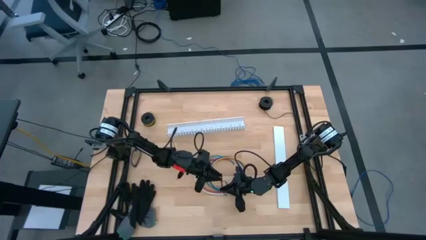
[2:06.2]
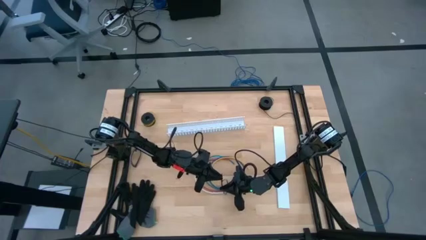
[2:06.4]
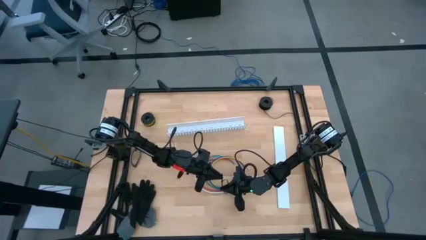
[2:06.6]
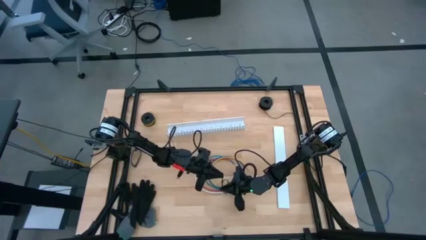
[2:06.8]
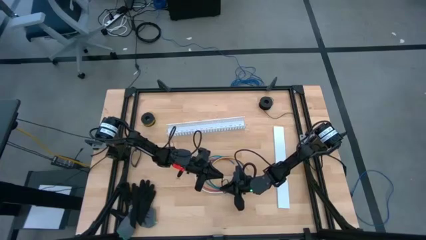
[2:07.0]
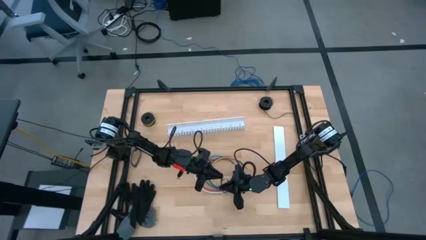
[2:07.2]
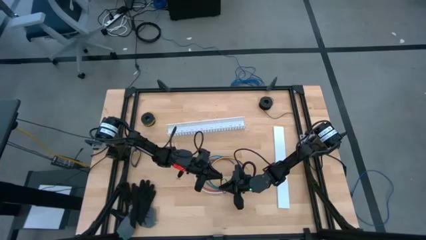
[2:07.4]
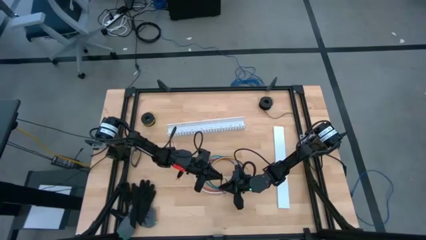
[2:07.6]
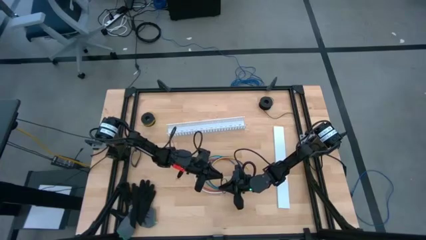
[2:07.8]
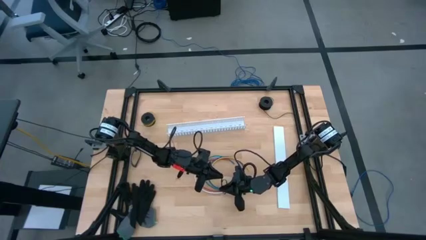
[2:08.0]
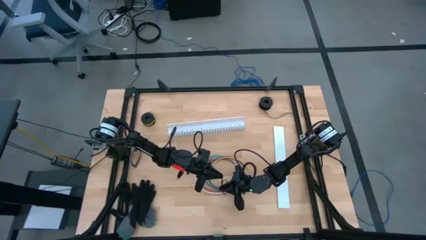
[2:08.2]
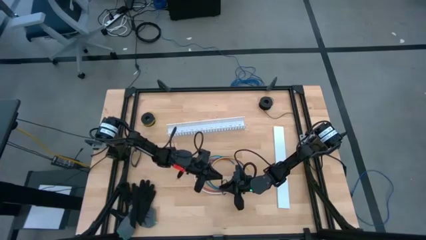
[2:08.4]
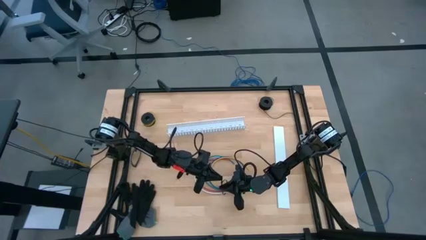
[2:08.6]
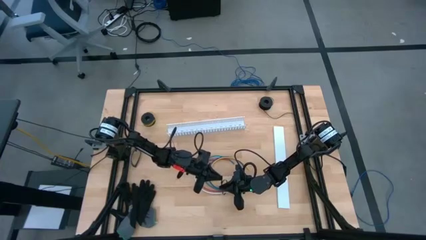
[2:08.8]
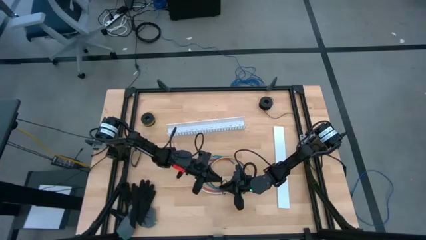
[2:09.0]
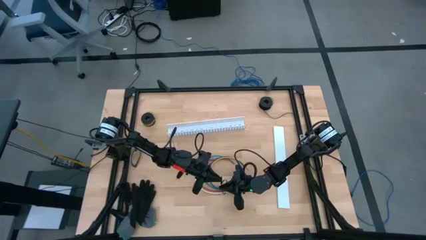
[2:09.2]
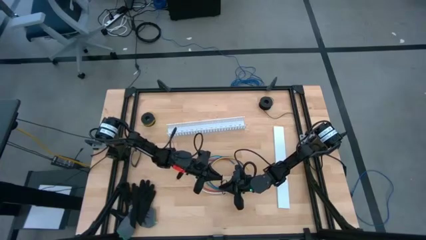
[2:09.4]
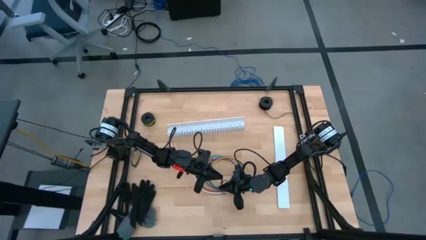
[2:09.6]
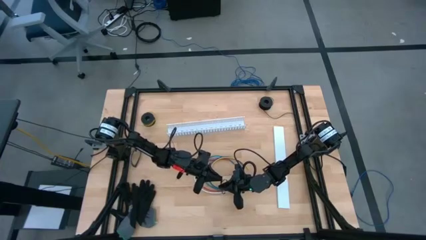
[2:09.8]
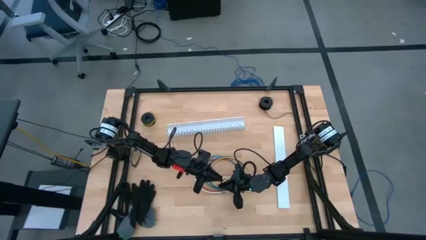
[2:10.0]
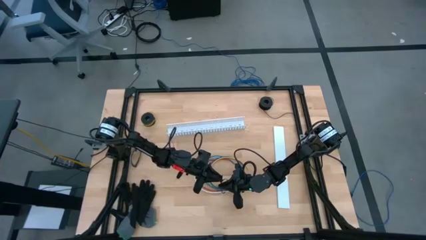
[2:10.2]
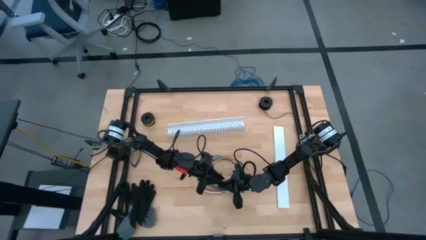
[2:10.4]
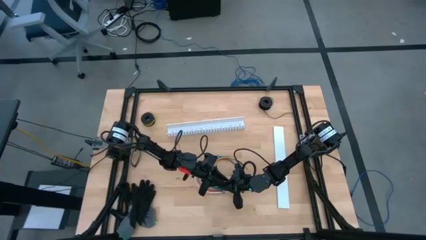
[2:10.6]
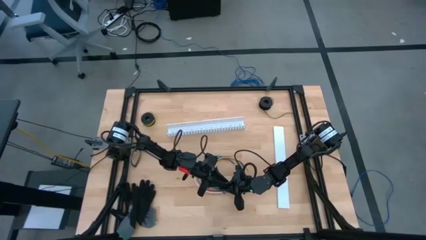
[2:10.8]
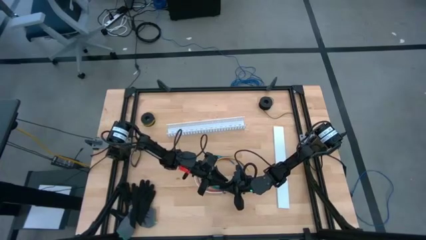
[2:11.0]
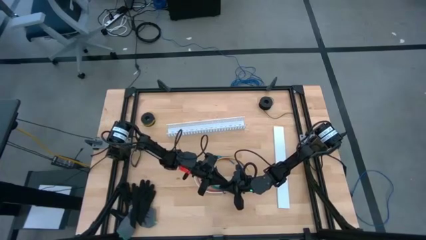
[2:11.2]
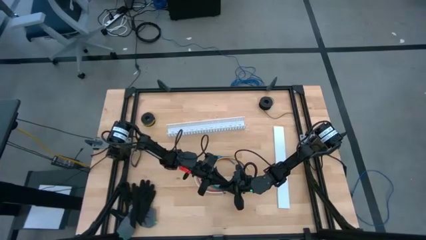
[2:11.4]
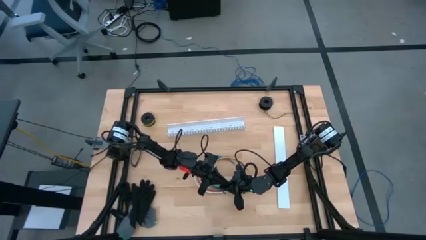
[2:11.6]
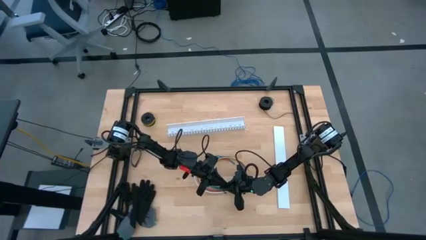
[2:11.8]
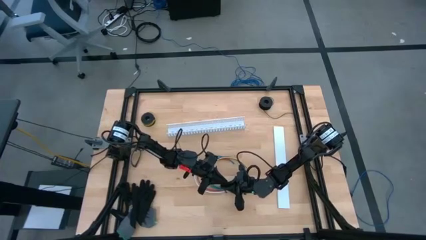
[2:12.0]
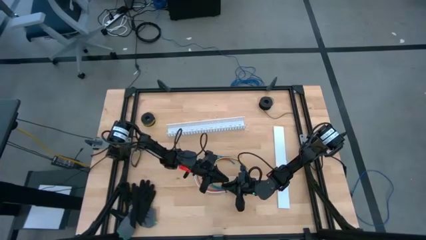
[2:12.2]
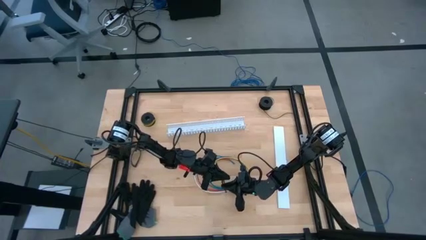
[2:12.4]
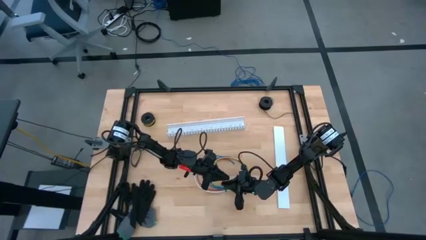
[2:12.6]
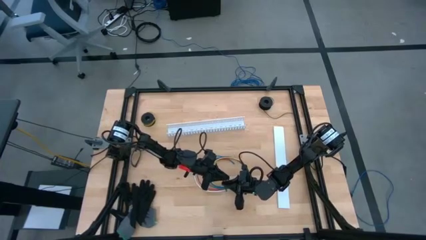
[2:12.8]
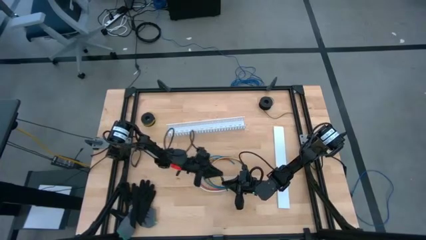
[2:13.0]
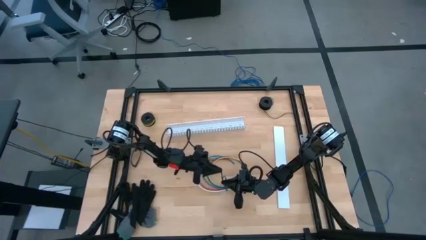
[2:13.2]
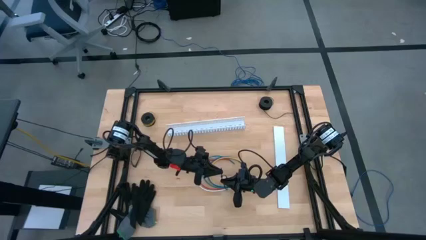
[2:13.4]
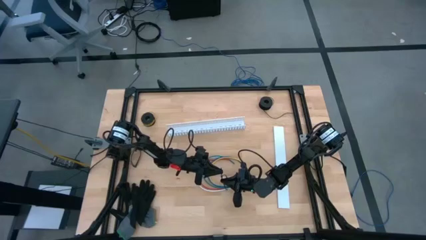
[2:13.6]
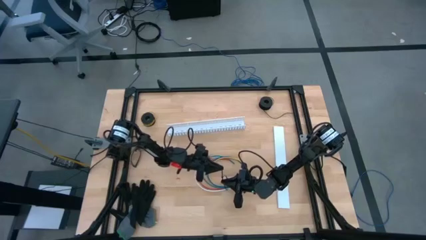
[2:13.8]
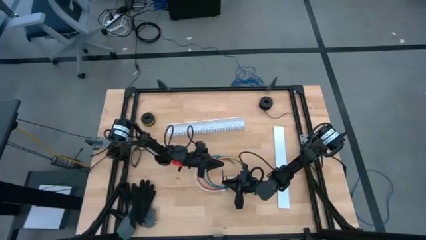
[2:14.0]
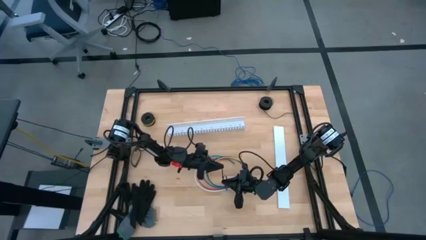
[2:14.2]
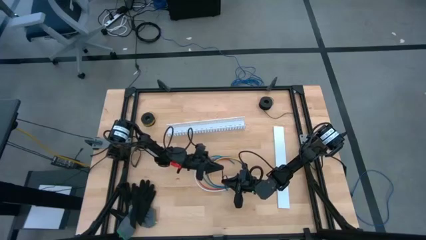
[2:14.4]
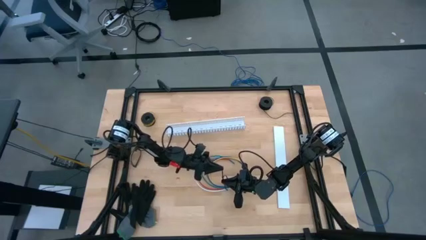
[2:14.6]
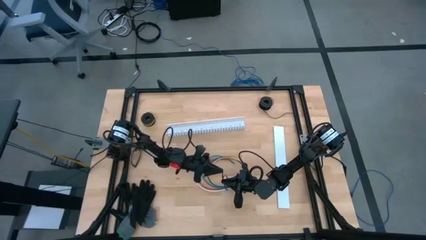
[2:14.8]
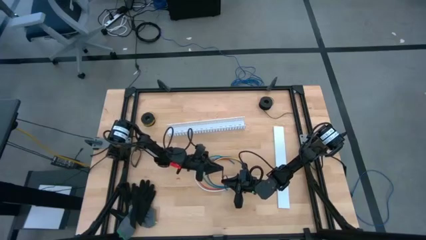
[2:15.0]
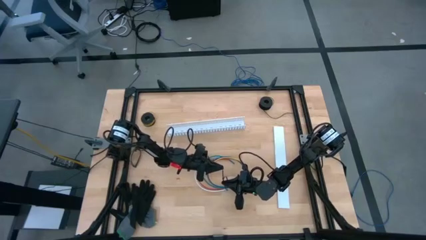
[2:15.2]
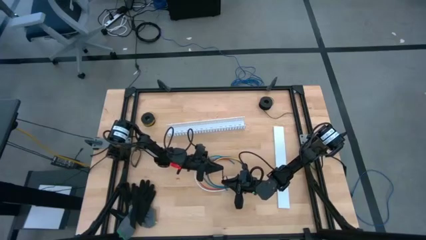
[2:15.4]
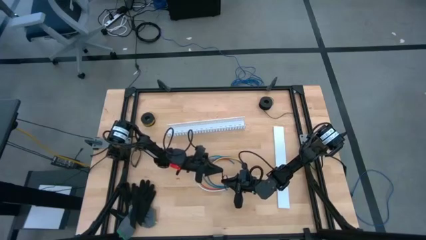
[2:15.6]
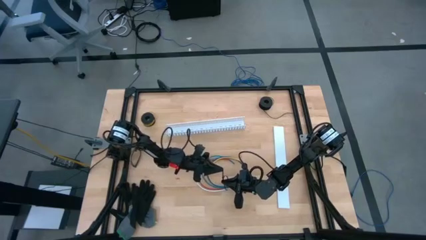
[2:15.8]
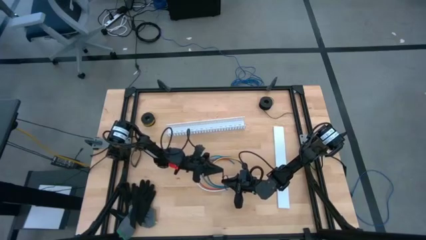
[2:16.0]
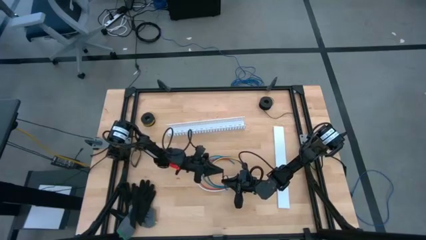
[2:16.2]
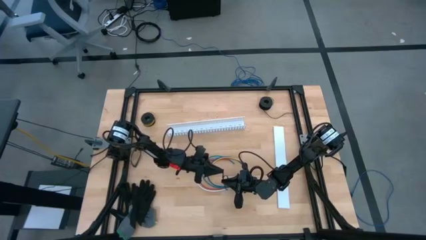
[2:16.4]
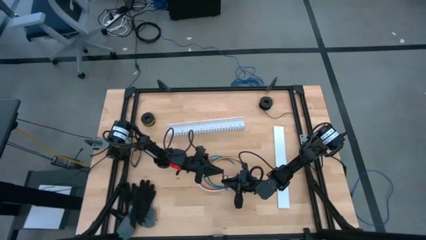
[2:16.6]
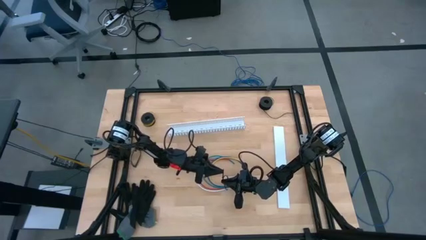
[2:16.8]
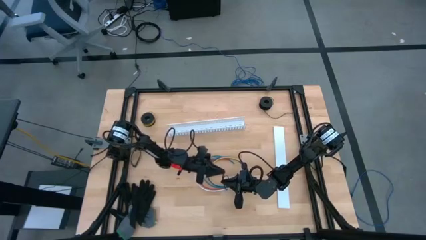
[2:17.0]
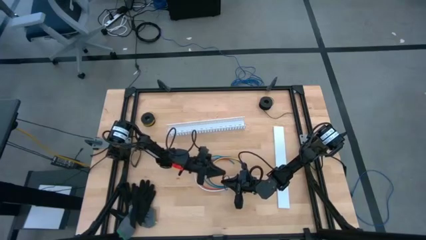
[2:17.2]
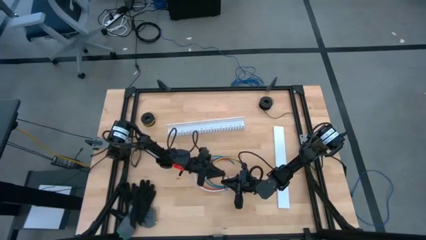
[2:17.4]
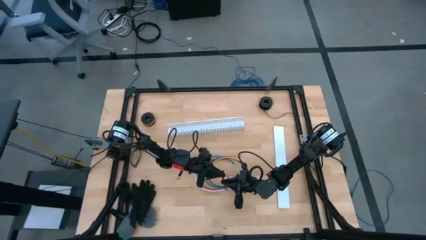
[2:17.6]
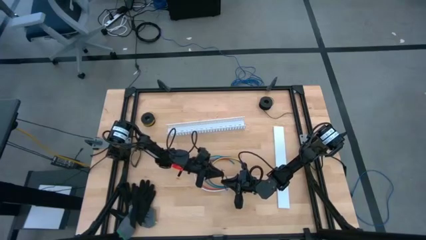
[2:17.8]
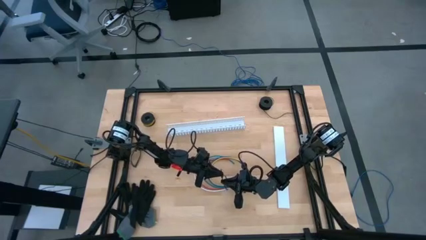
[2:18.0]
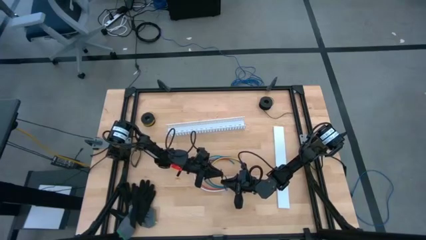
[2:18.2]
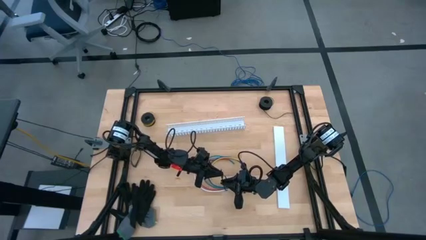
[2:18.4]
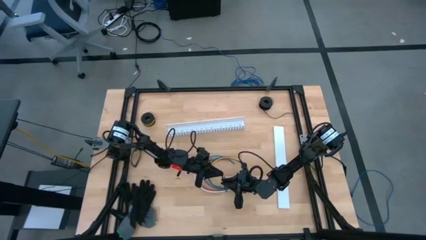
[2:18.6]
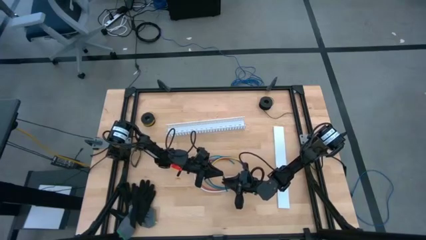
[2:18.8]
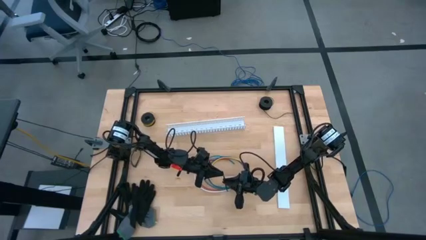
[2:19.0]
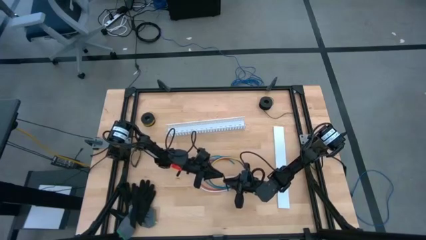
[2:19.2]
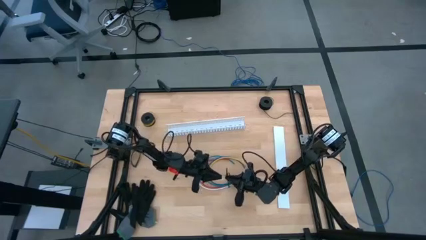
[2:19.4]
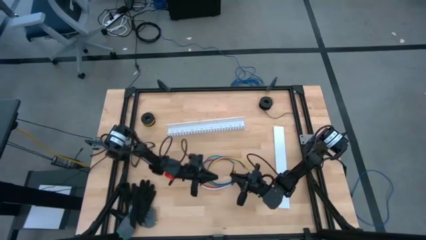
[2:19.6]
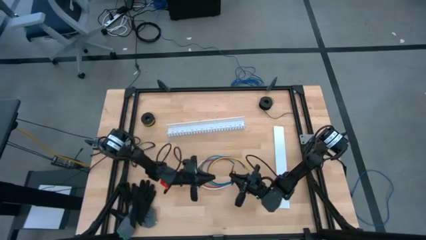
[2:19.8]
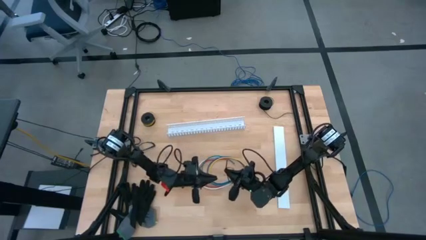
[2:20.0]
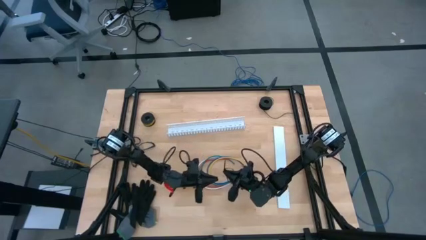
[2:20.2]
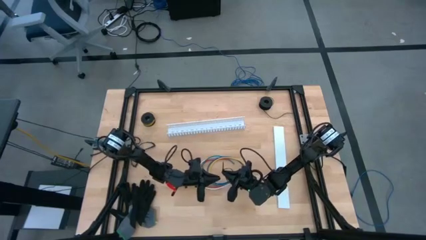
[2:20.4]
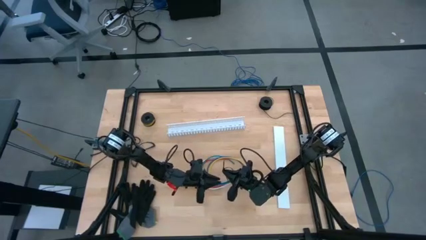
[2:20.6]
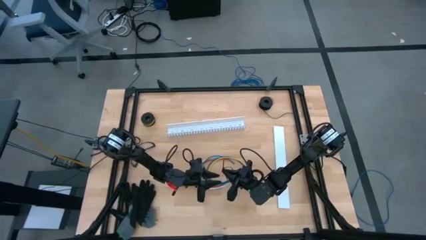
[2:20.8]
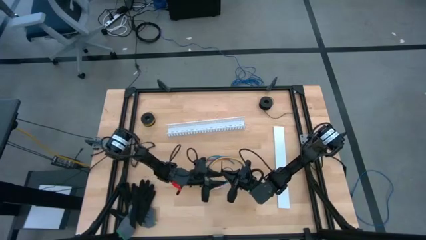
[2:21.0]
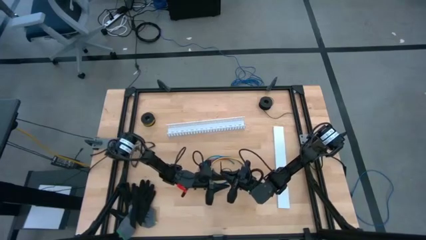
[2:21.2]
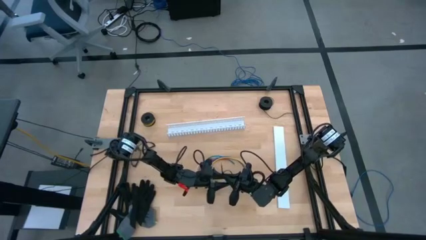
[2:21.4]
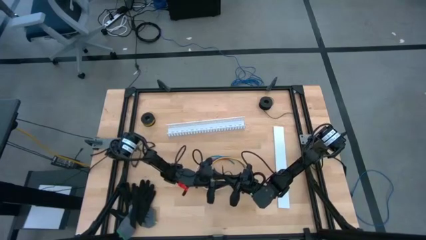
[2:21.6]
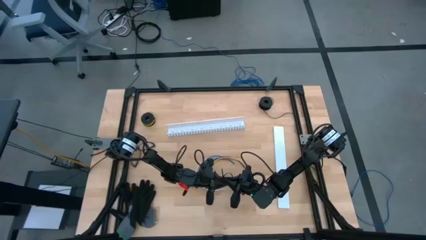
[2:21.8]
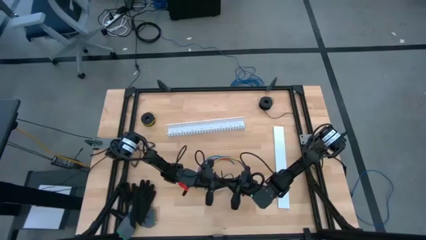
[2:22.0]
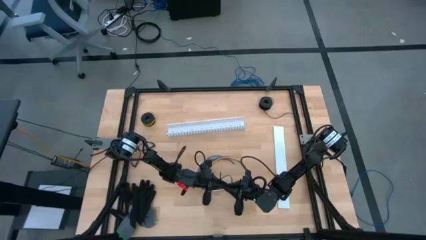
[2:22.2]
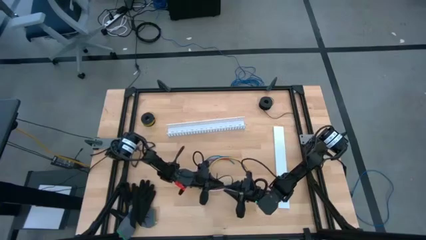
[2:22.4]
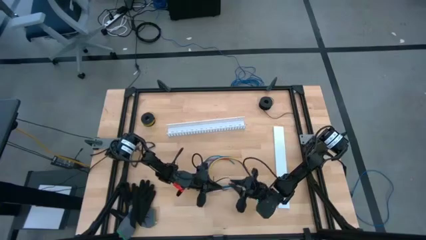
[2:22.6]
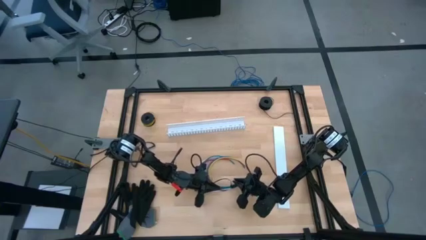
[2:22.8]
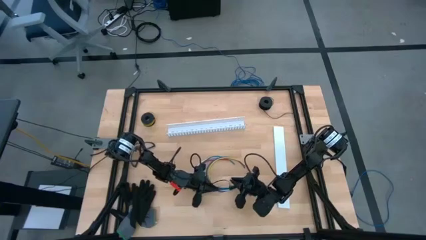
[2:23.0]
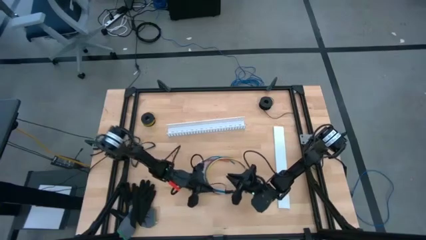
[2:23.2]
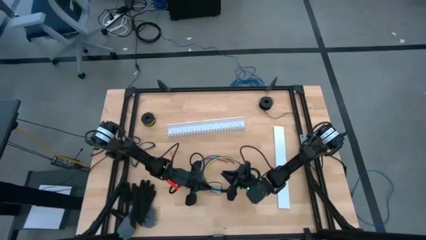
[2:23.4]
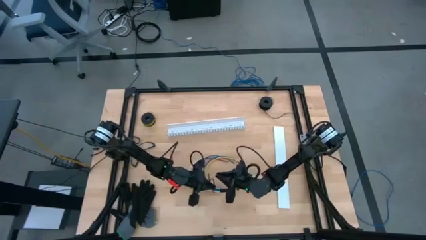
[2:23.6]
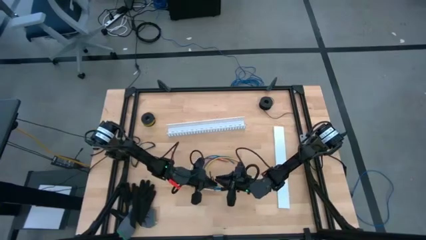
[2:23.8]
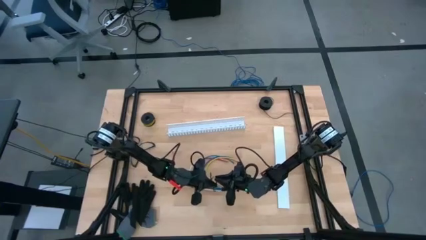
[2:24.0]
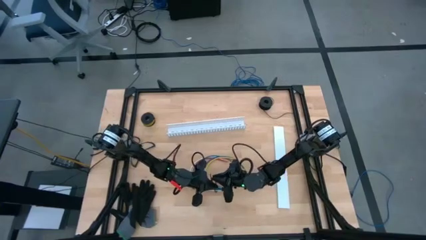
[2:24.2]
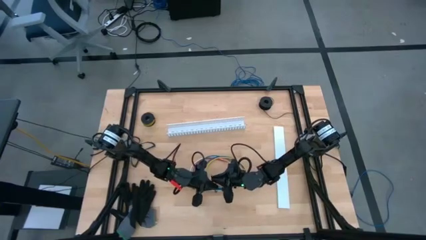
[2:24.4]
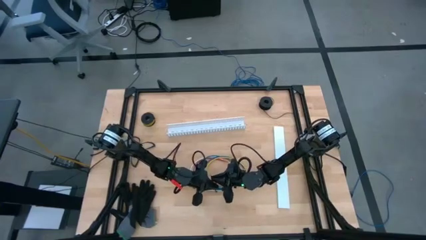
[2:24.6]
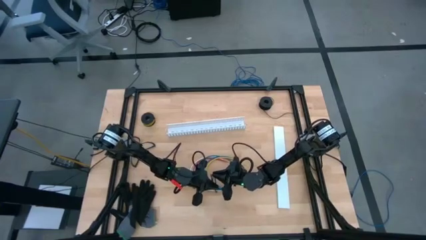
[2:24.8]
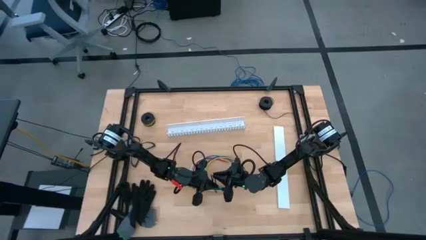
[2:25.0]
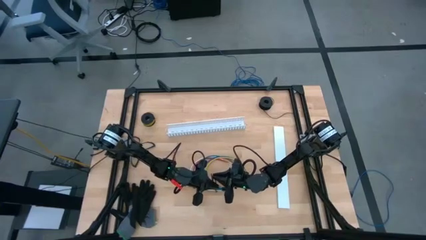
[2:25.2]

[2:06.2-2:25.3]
Task: Ziptie cables
Insert zip tie on the cable wire
